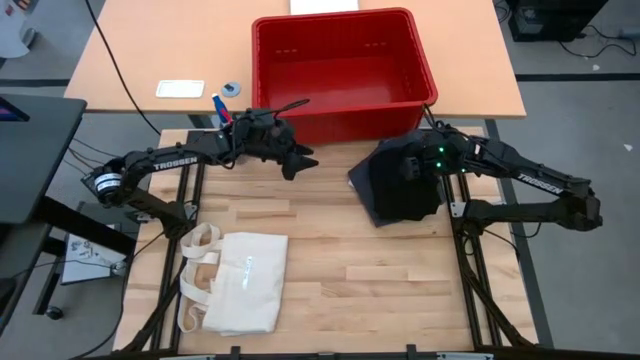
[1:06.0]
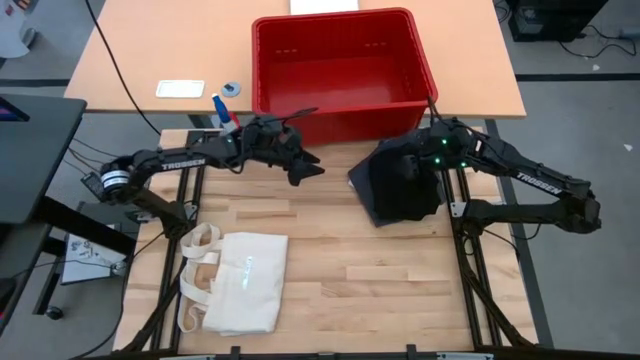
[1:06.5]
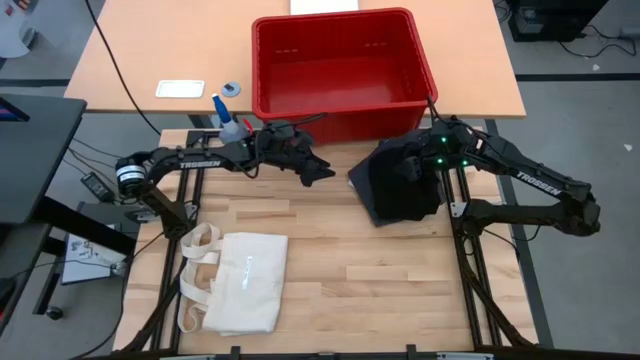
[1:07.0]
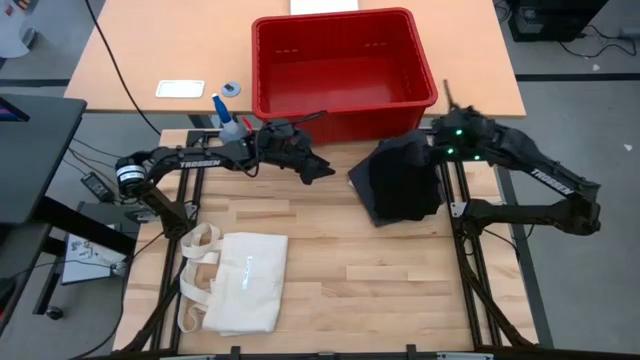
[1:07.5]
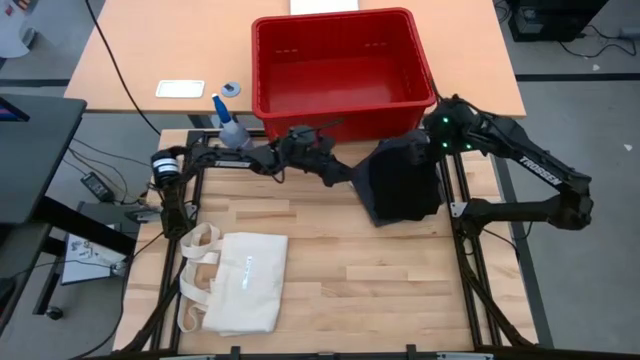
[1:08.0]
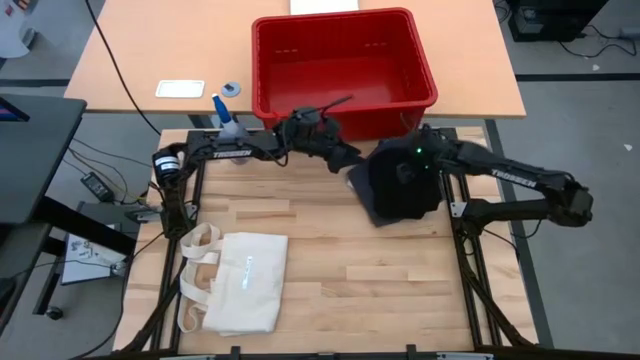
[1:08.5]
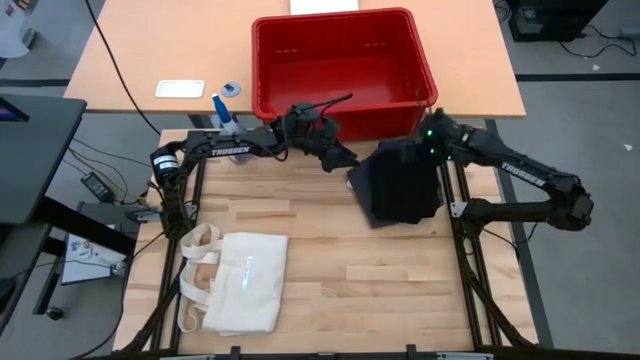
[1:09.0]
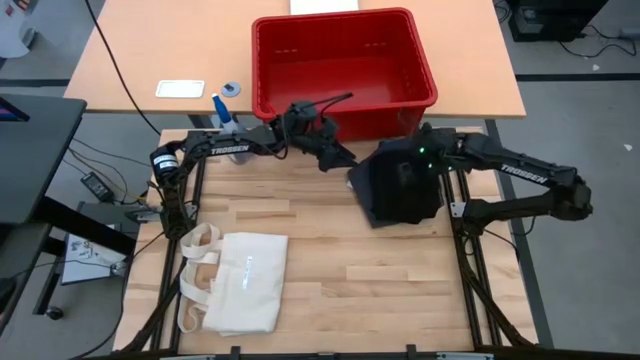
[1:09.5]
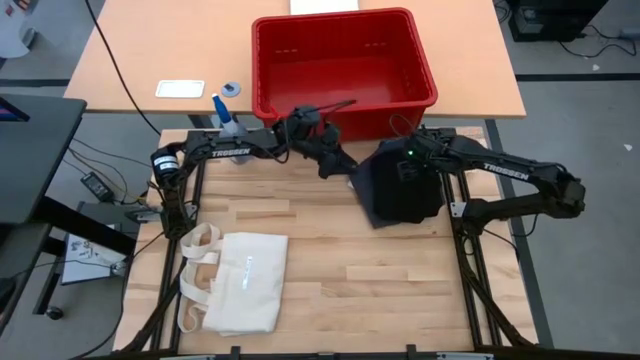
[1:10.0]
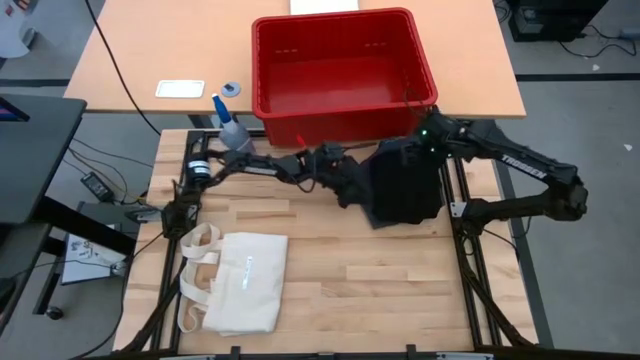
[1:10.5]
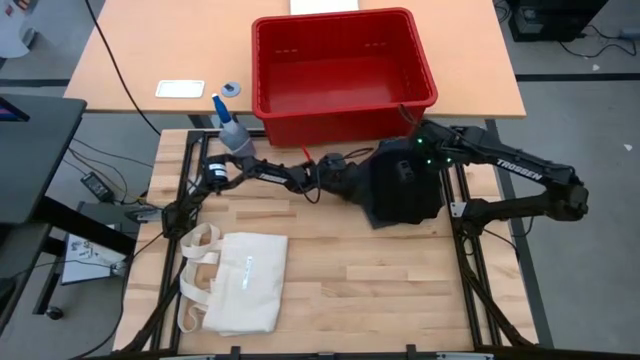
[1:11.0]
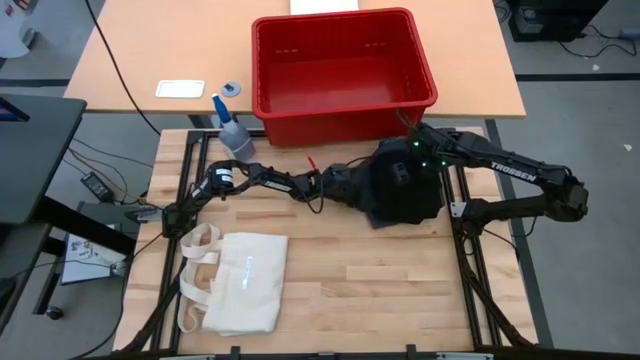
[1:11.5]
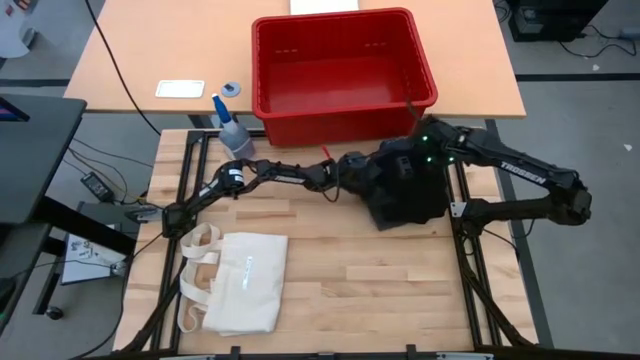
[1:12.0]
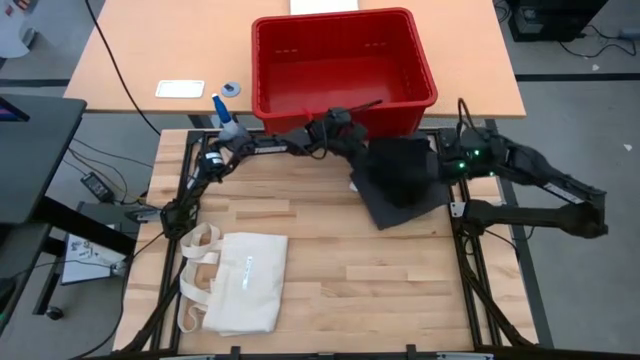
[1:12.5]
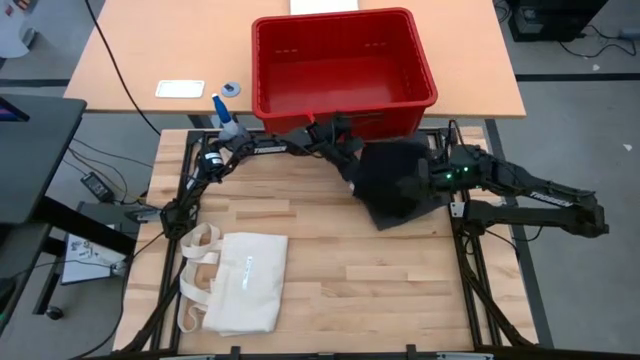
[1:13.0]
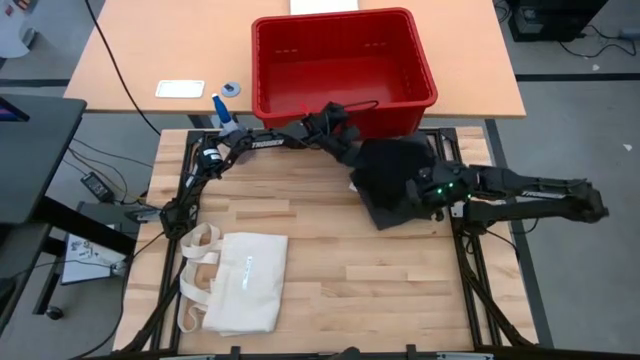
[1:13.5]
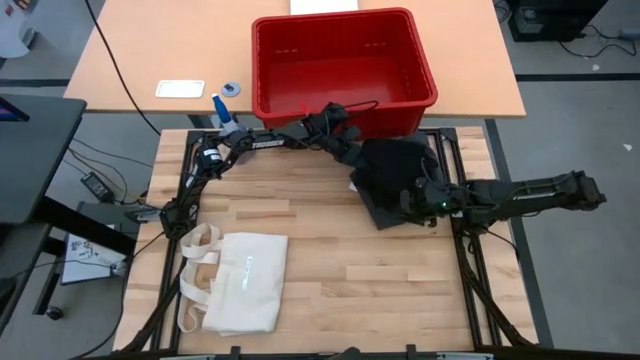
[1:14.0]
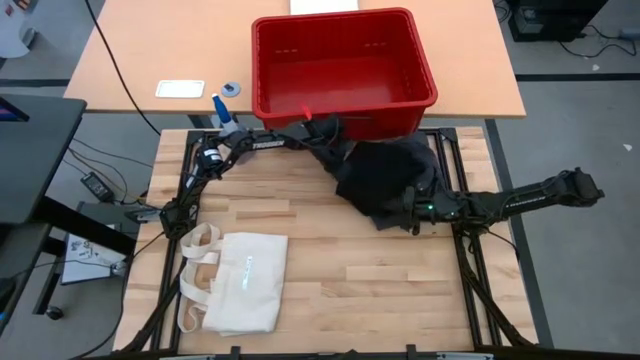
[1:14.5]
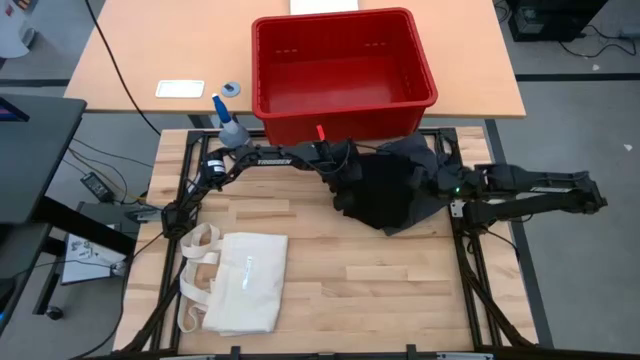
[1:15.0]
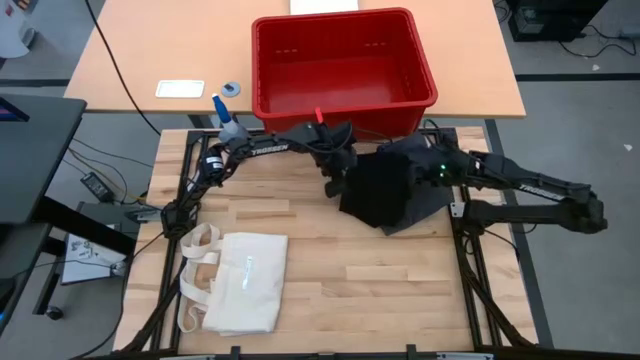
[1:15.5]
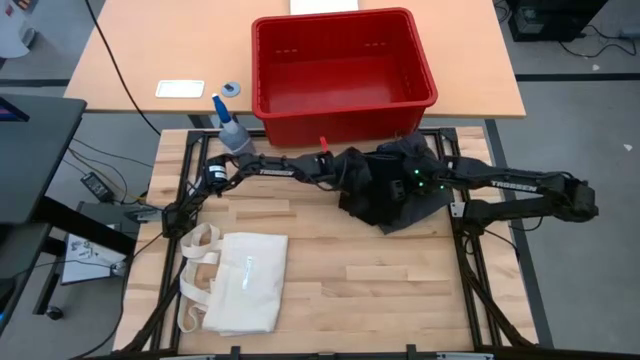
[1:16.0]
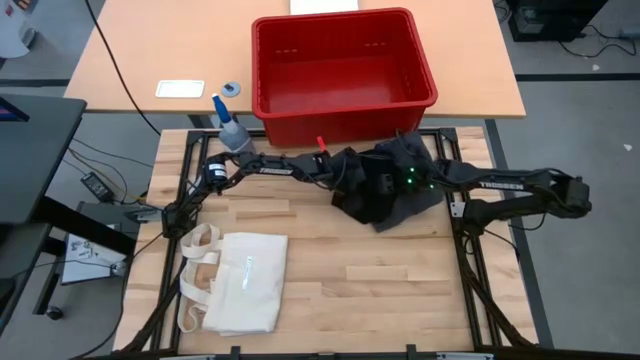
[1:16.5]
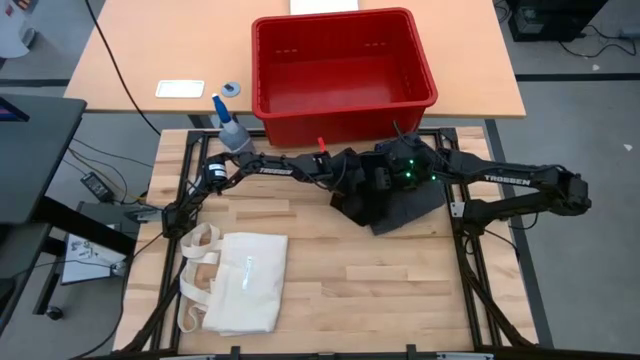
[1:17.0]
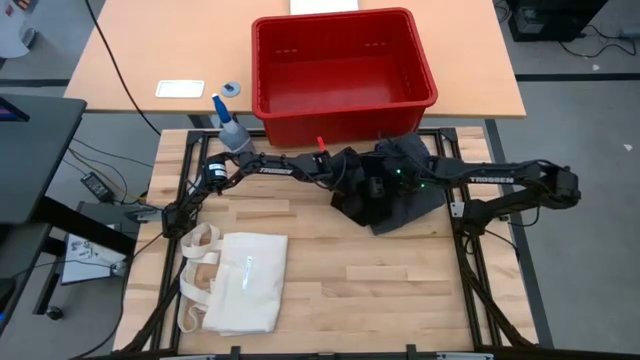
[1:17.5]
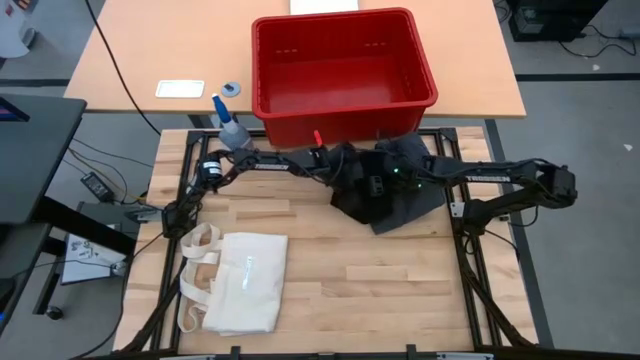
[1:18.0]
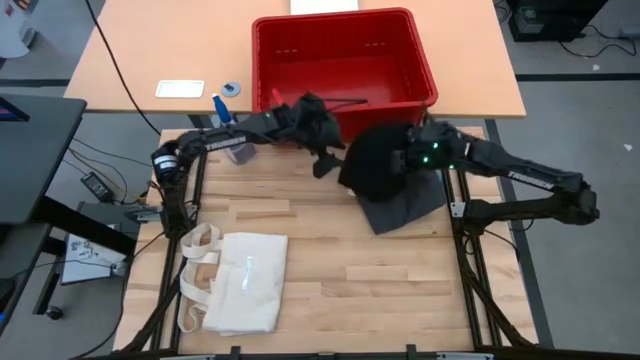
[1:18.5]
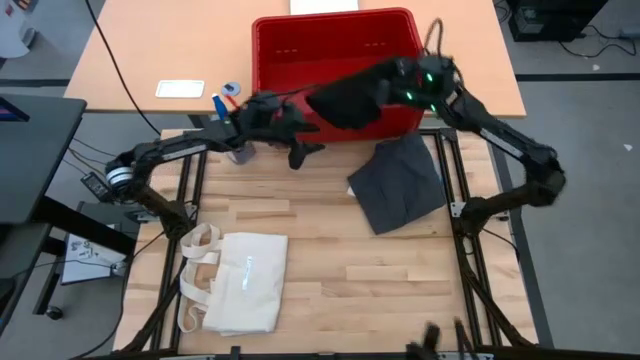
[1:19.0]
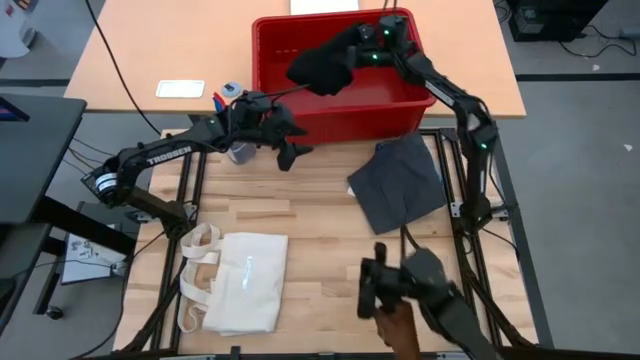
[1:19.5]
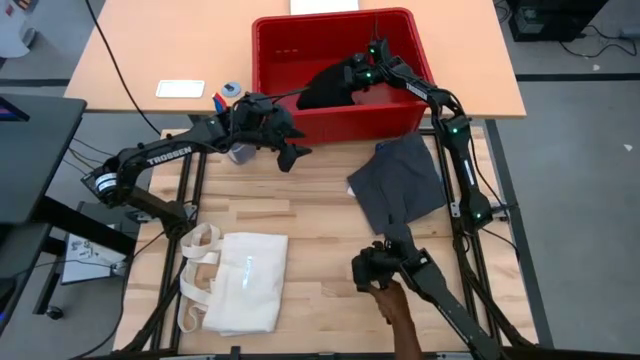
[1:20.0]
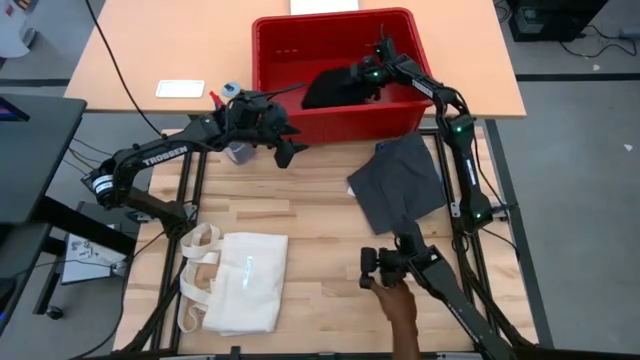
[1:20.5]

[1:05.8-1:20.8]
Task: Fold laundry
Put the folded black pants into the red bin

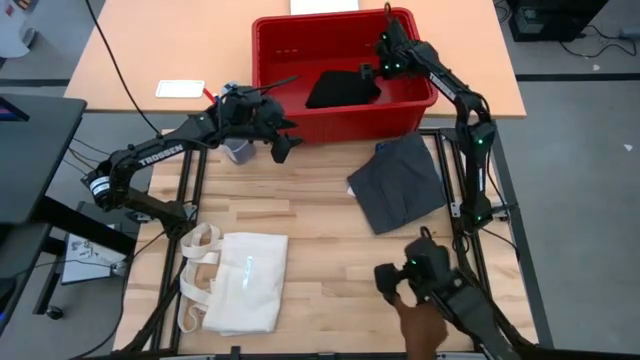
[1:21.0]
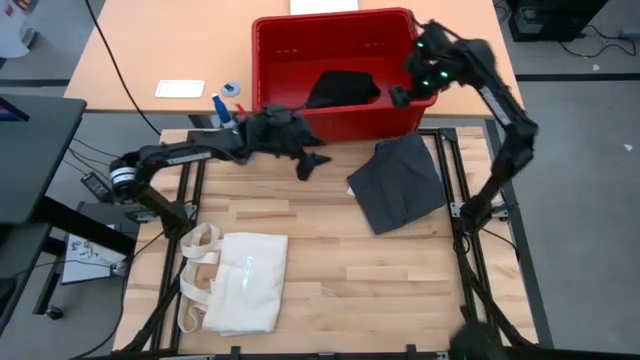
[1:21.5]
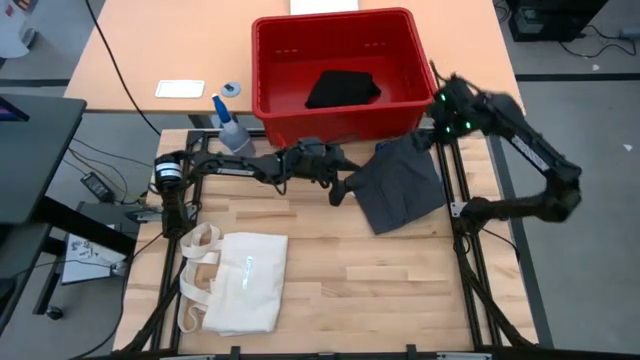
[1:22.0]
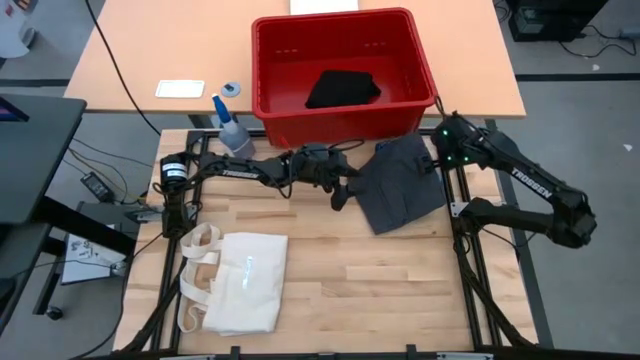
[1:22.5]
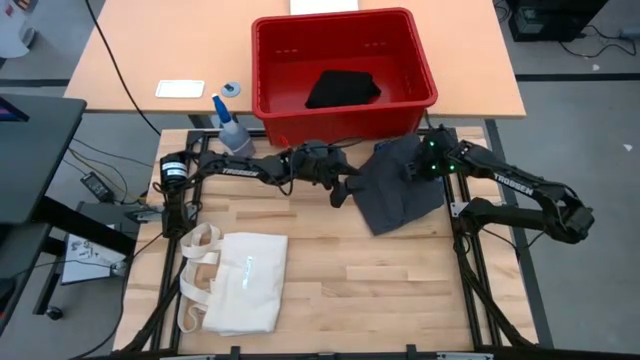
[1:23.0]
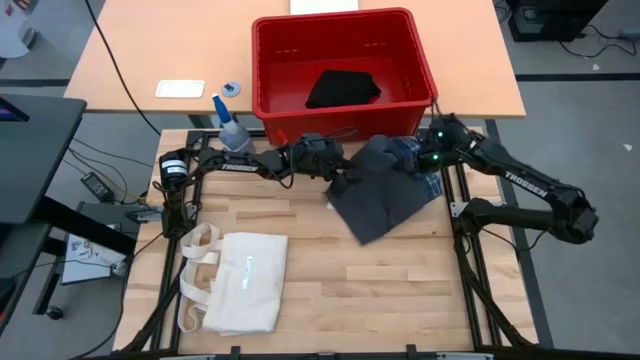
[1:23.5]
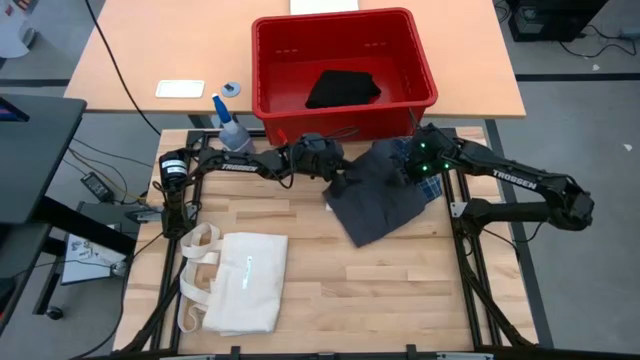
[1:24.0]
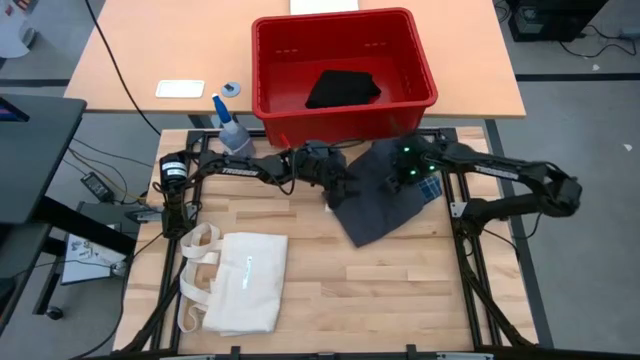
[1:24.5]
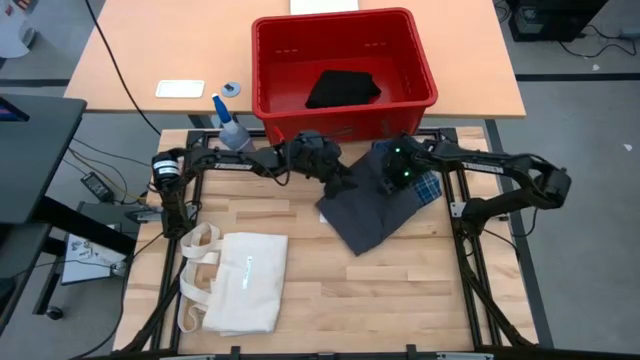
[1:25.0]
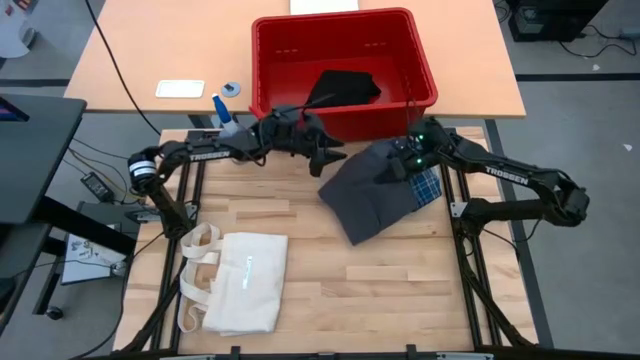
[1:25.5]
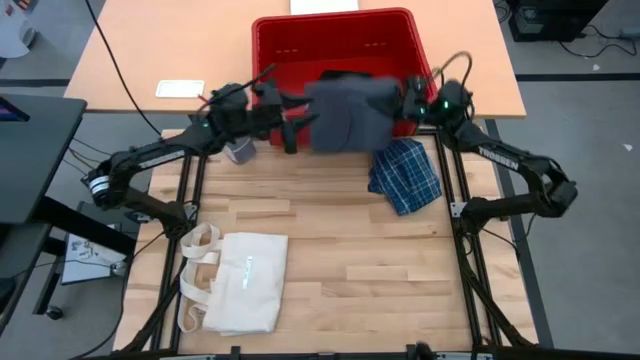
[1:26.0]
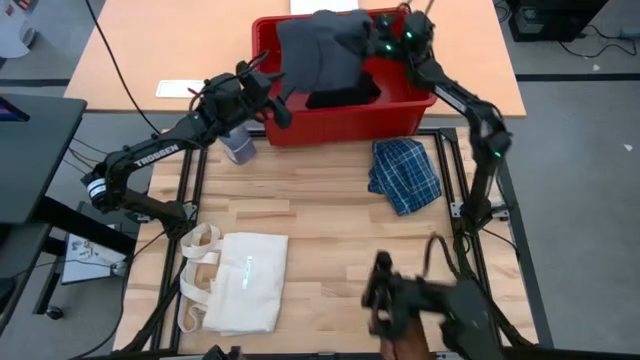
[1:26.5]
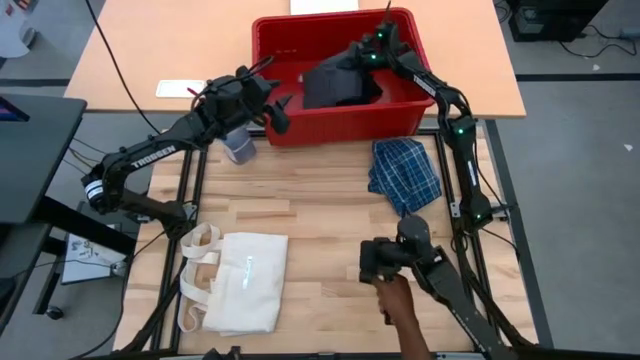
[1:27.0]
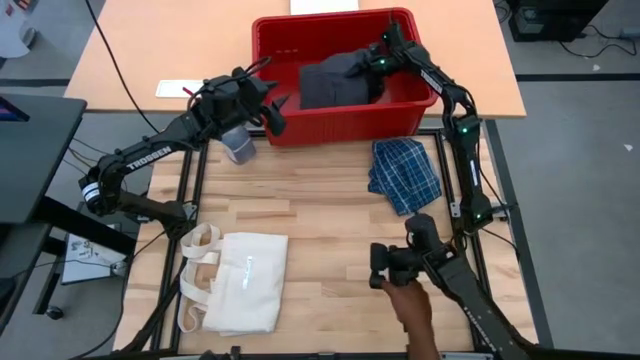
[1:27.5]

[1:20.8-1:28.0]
Put the folded gray pants into the red bin
